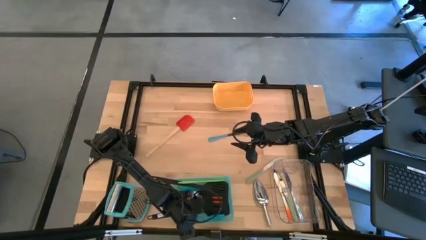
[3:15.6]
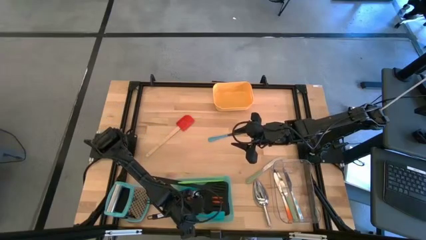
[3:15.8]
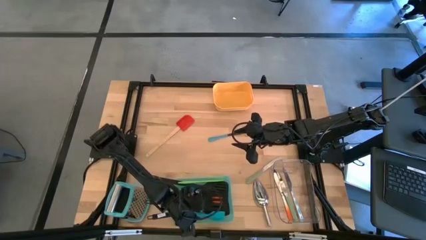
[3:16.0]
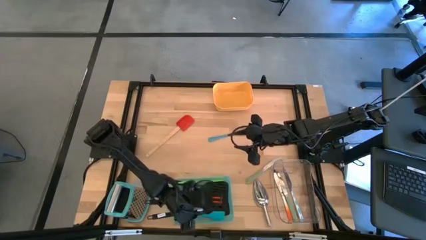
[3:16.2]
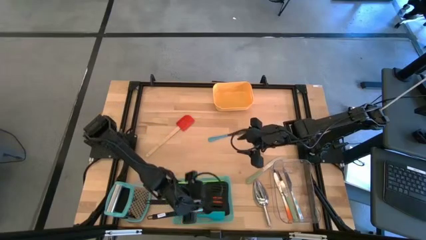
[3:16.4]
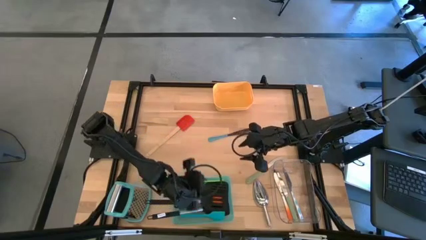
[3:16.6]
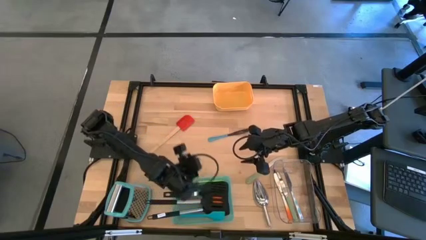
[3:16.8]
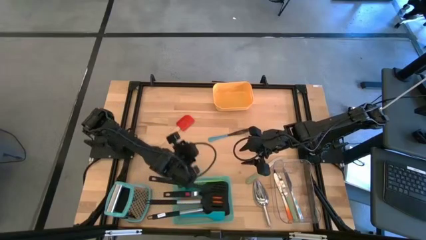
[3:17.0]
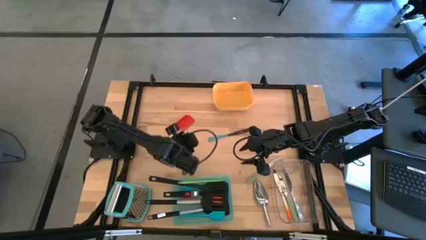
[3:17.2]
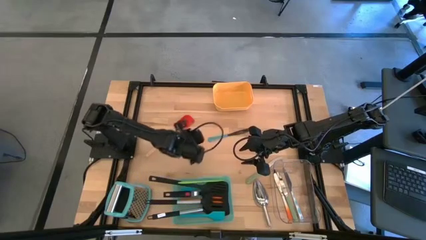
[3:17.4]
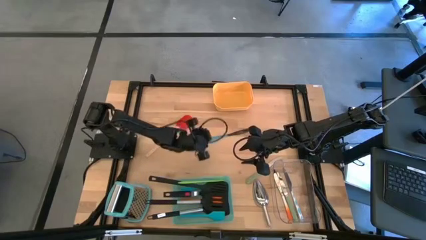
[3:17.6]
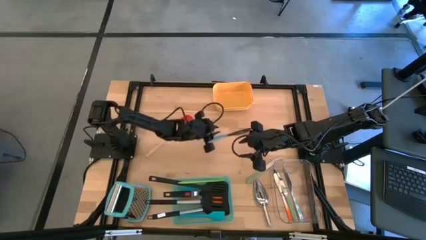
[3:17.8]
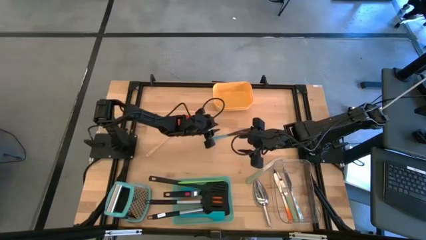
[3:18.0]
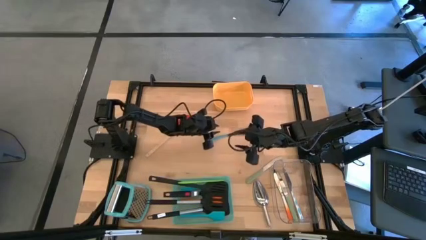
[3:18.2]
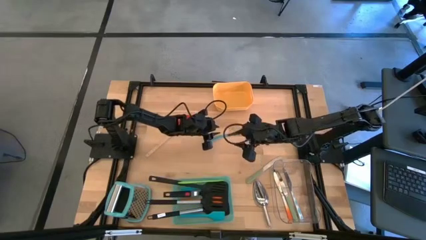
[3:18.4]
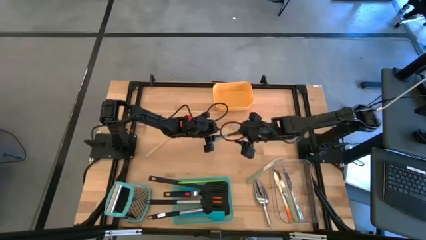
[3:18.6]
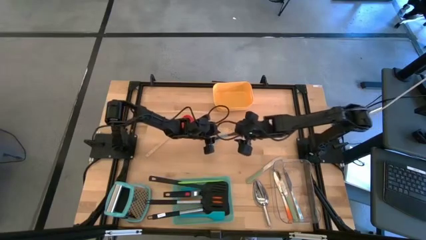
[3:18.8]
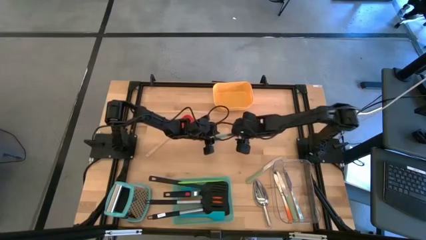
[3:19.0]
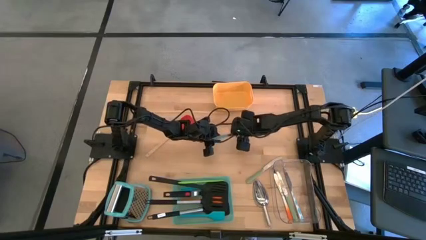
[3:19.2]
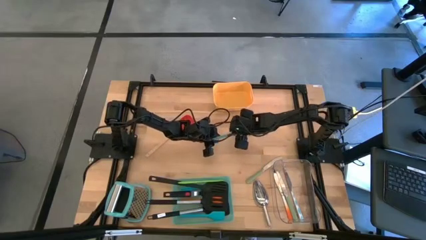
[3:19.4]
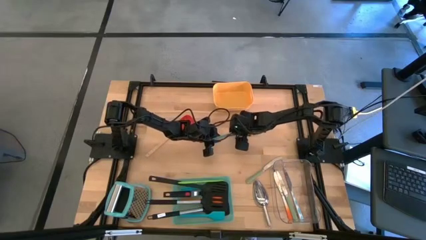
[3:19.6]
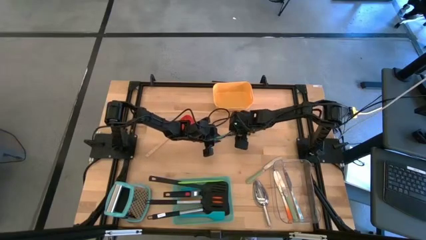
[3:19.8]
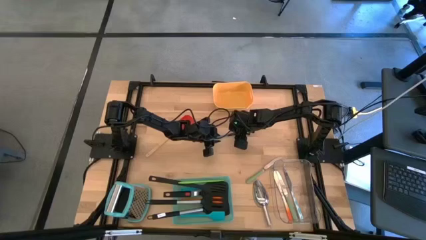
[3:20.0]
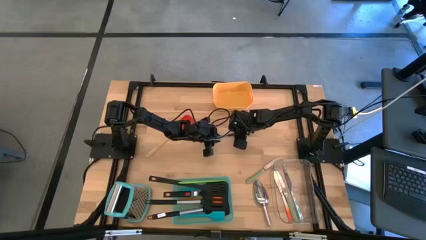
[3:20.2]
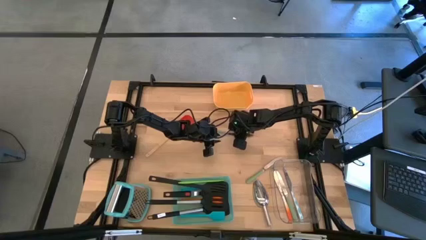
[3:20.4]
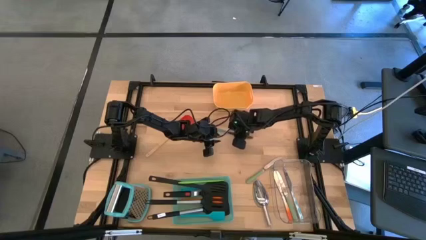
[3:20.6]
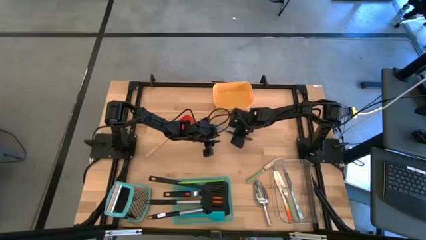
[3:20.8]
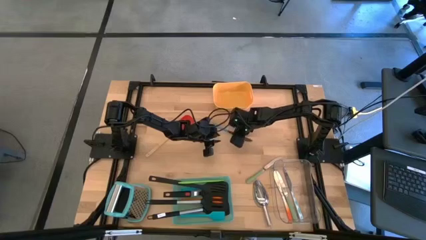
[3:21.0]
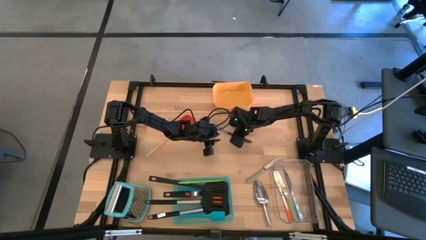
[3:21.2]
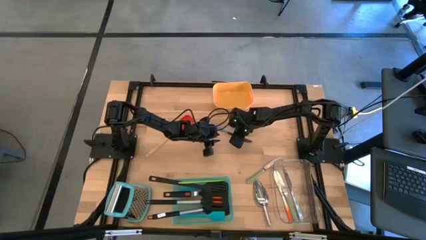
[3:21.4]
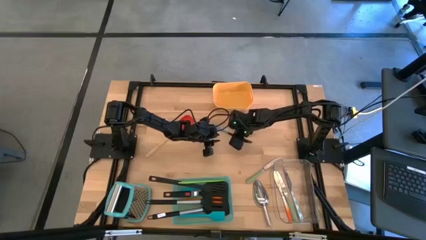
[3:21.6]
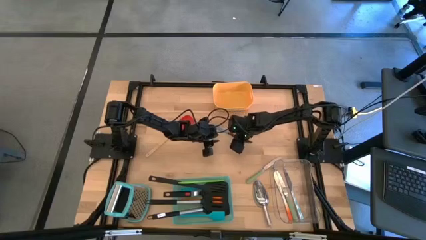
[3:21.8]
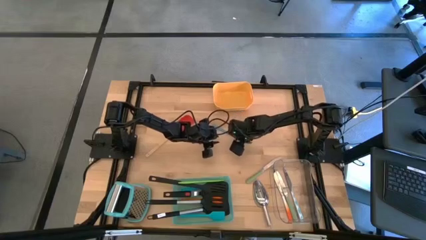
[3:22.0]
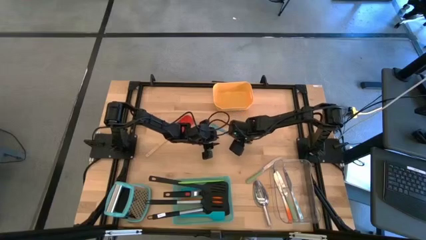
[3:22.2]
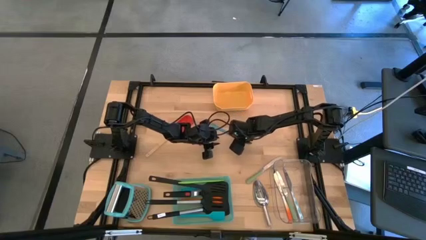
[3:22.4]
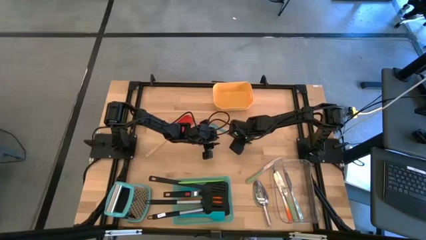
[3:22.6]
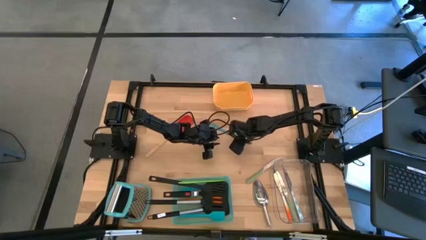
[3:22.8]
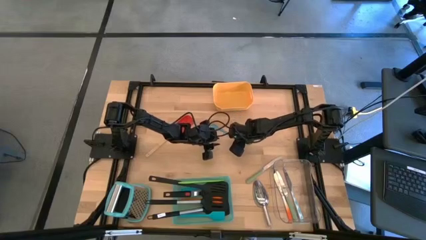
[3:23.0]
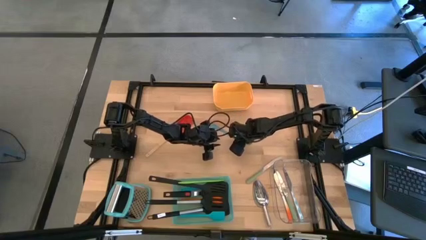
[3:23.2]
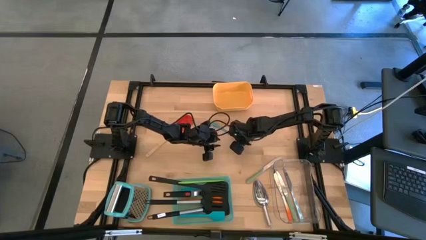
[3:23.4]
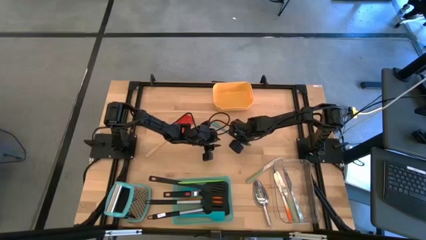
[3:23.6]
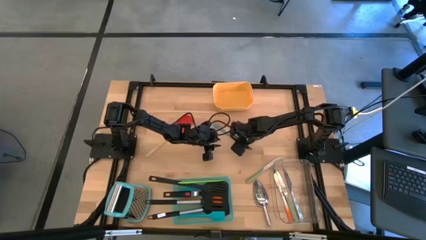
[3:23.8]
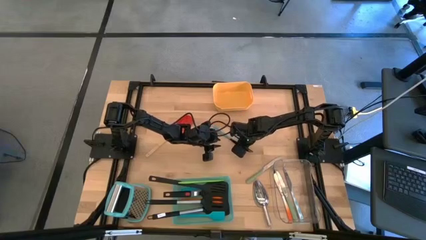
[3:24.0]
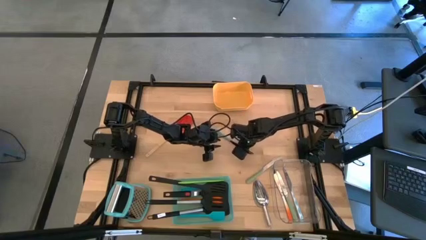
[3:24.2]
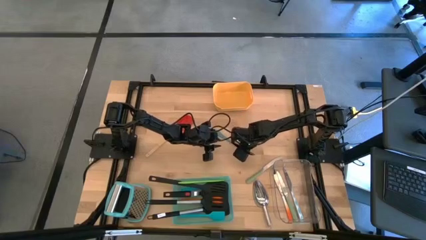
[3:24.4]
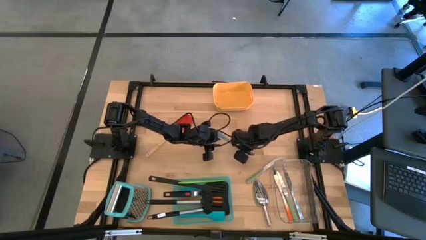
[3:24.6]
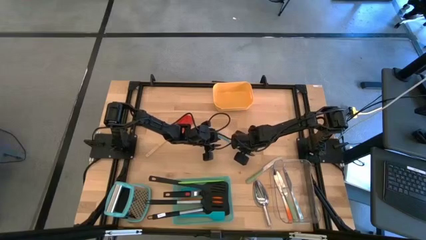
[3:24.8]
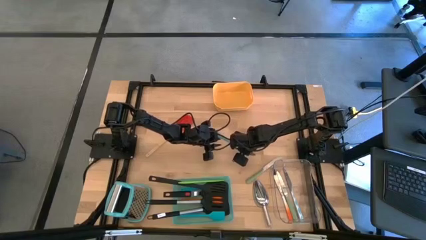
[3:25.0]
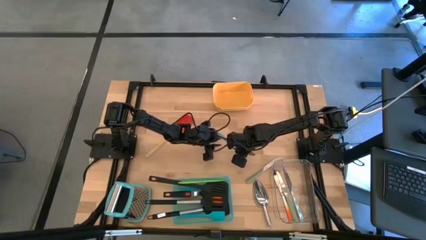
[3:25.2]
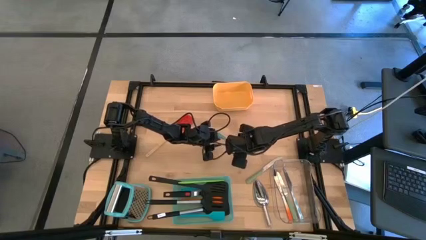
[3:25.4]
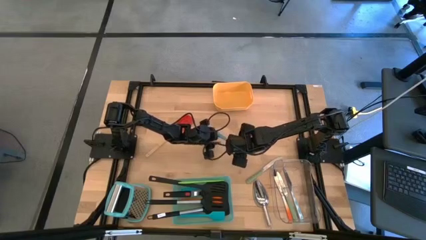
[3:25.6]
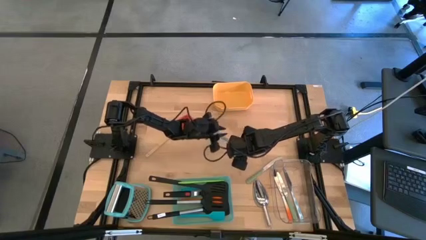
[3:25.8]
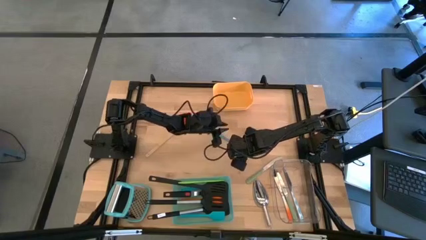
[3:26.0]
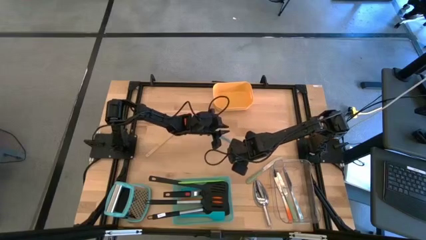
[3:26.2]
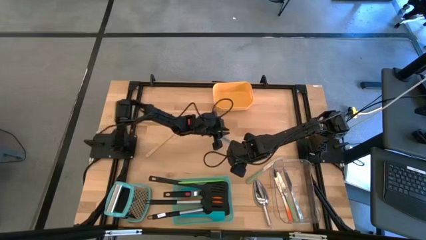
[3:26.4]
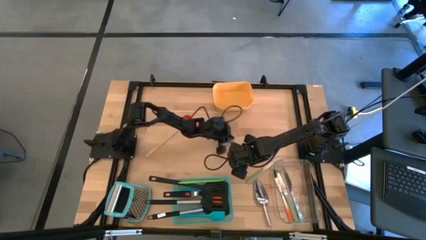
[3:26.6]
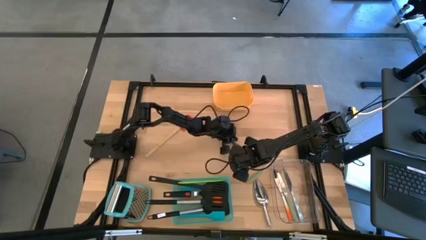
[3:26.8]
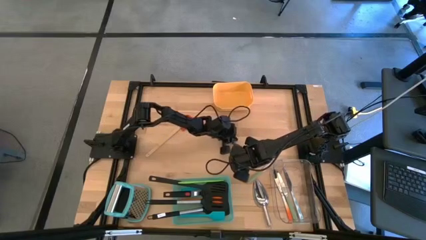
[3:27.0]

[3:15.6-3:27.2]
Task: Pick & Place Kitchen Items
Put the blue table knife into the transparent bin

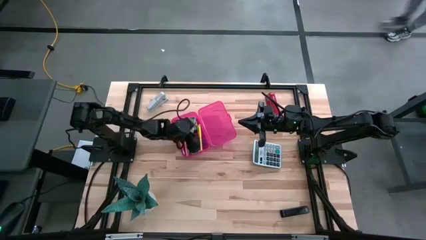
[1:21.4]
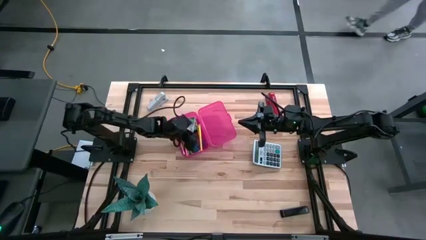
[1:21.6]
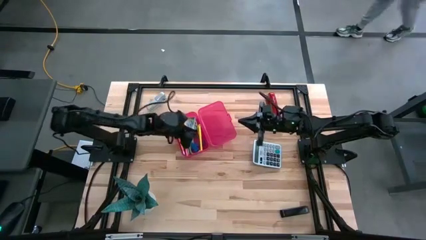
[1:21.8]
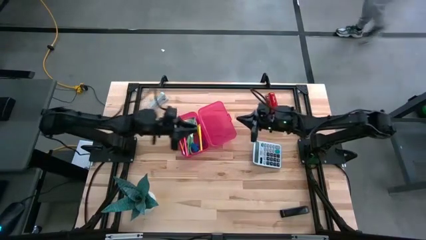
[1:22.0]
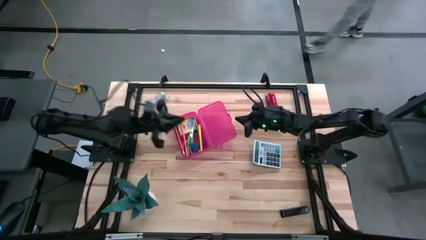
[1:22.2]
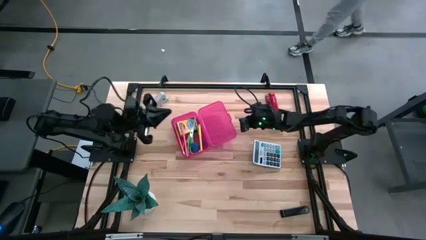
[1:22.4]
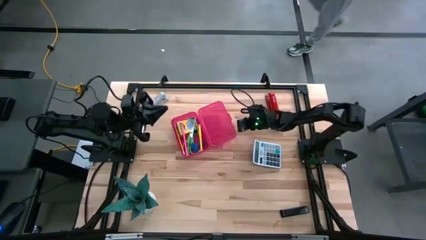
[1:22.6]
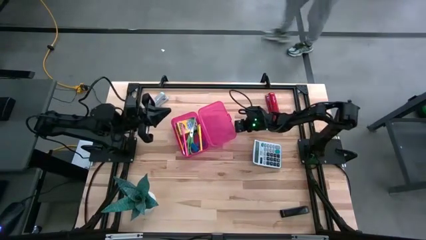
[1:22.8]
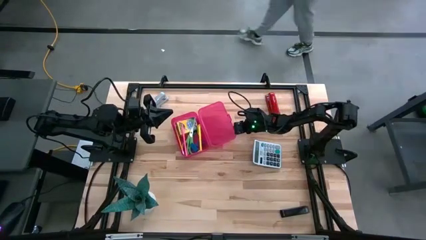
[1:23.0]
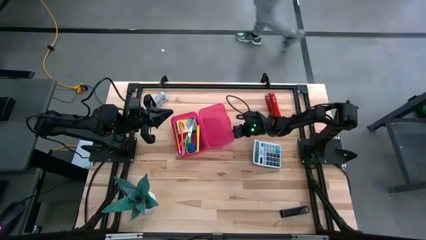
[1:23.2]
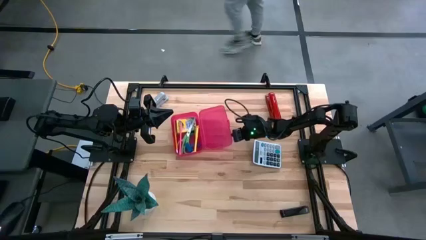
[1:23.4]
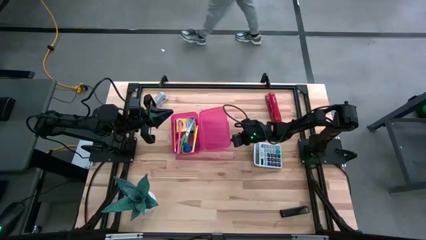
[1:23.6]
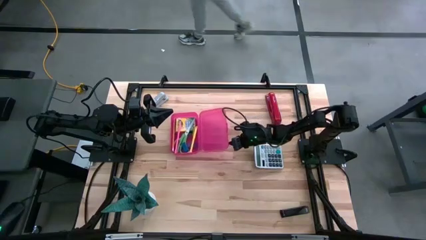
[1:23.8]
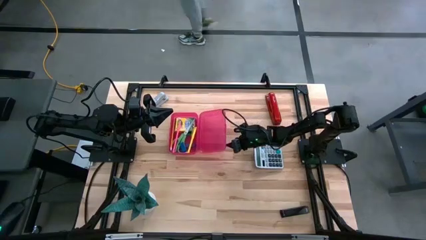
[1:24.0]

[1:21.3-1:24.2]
Task: Pack school essentials
Adjust the pink pencil box
